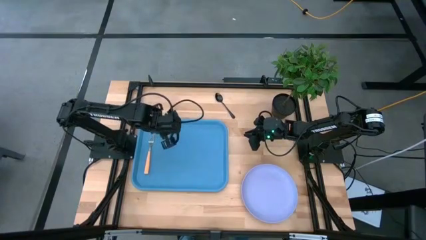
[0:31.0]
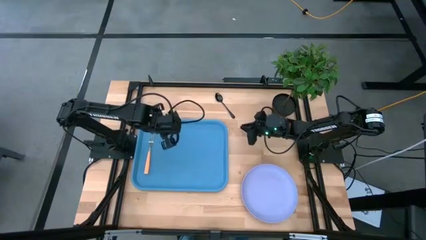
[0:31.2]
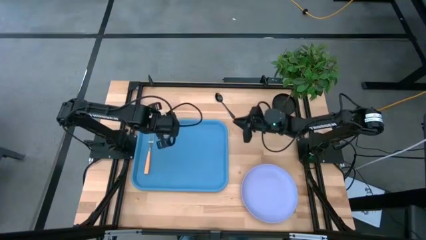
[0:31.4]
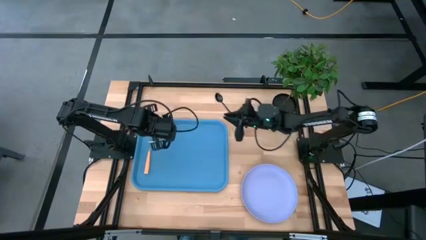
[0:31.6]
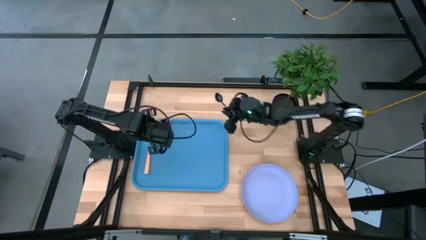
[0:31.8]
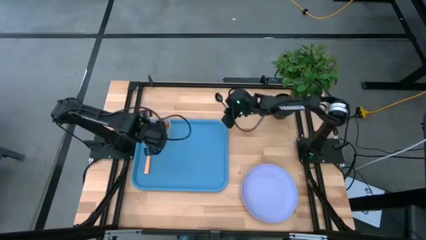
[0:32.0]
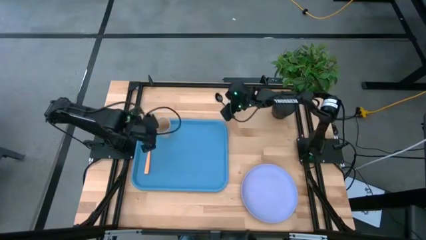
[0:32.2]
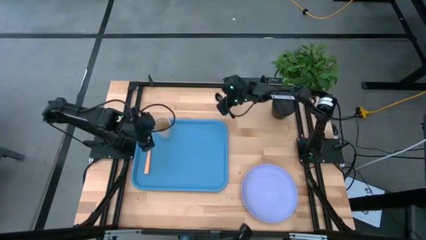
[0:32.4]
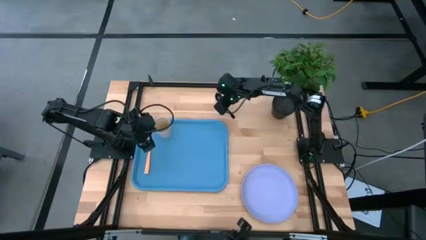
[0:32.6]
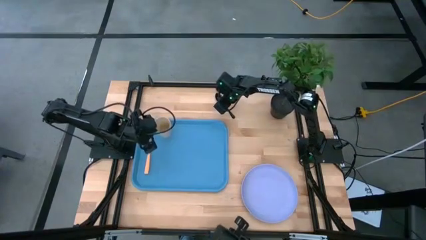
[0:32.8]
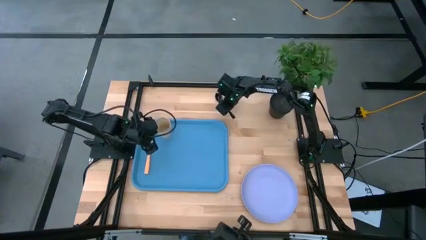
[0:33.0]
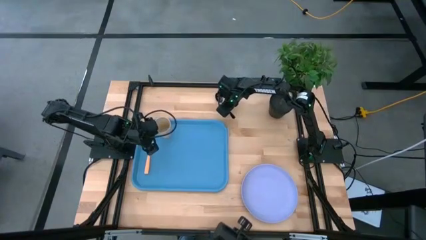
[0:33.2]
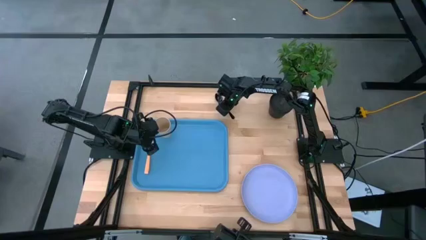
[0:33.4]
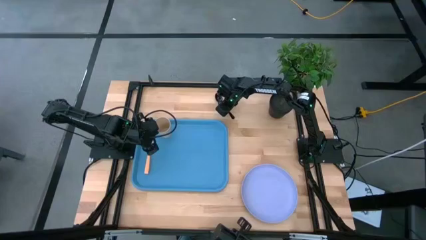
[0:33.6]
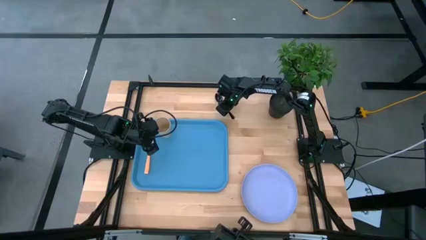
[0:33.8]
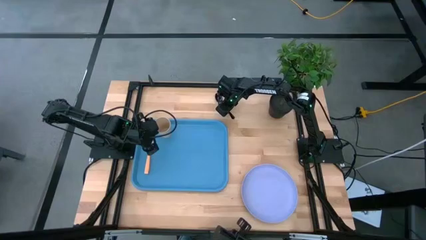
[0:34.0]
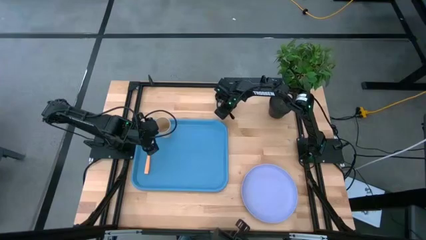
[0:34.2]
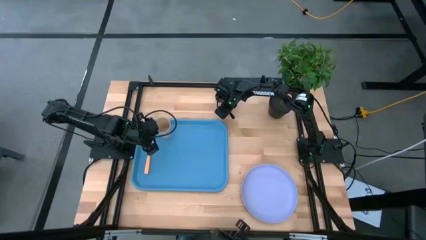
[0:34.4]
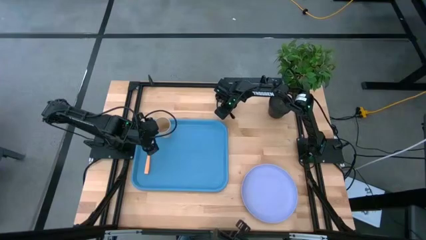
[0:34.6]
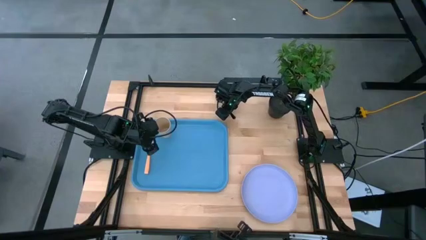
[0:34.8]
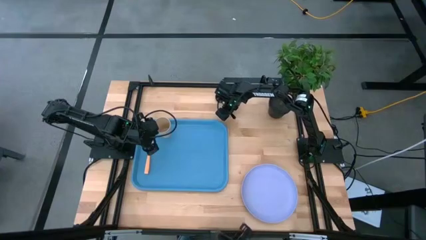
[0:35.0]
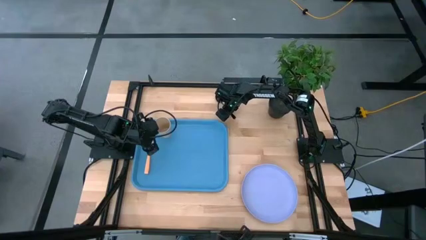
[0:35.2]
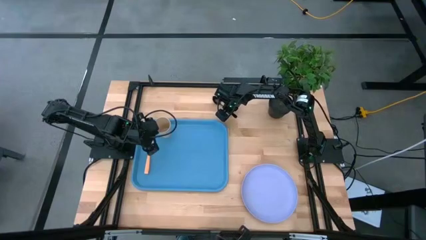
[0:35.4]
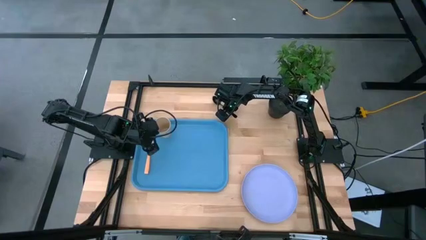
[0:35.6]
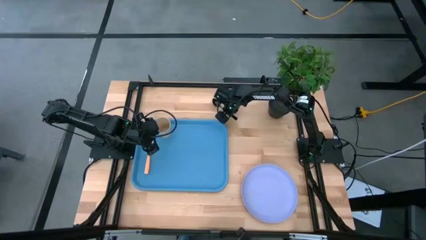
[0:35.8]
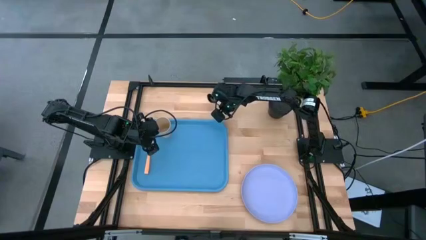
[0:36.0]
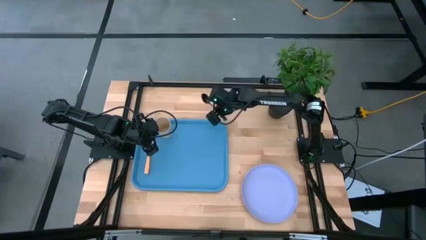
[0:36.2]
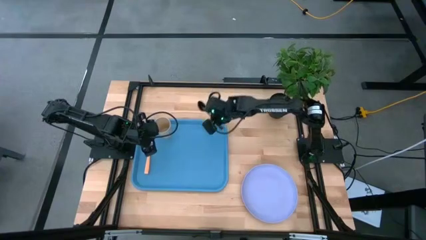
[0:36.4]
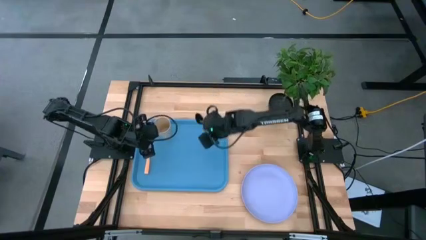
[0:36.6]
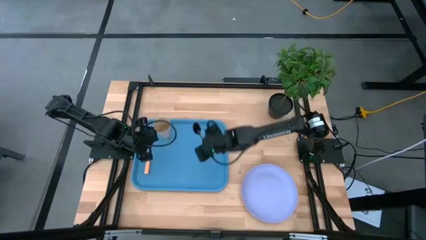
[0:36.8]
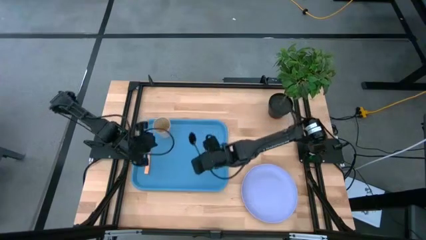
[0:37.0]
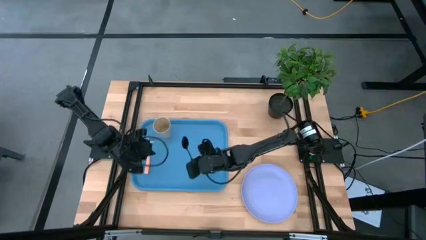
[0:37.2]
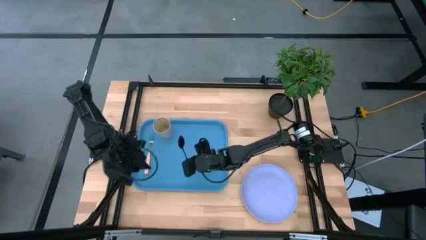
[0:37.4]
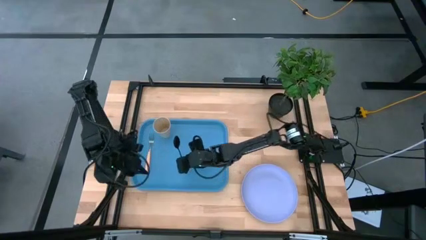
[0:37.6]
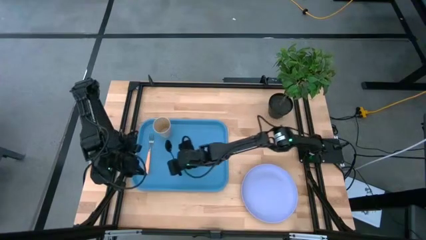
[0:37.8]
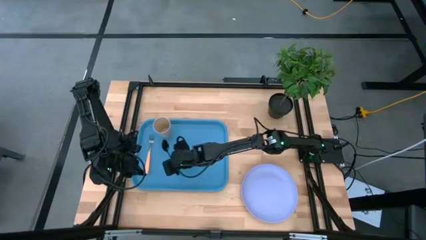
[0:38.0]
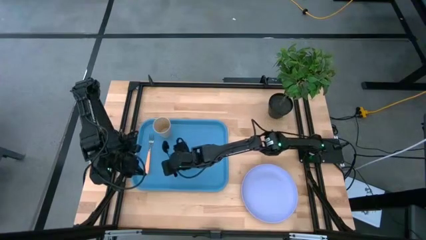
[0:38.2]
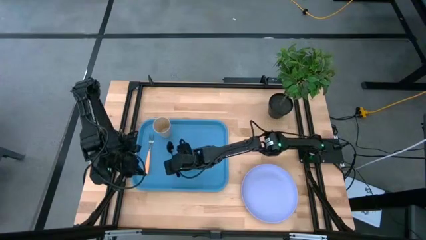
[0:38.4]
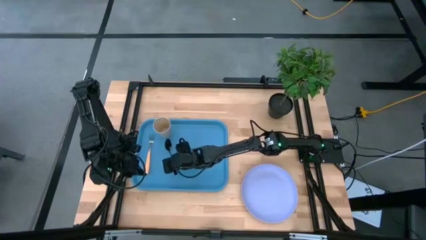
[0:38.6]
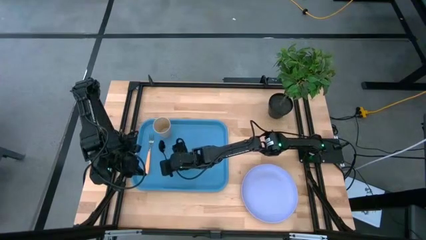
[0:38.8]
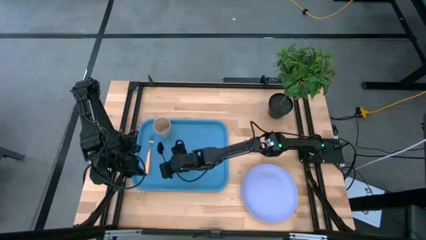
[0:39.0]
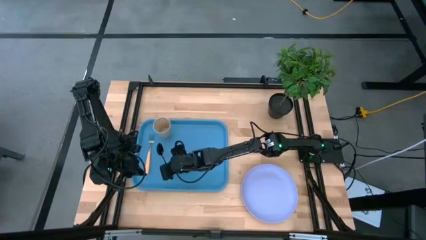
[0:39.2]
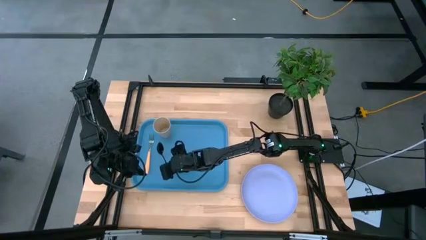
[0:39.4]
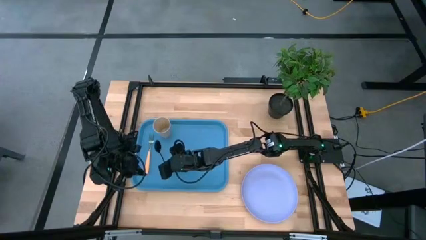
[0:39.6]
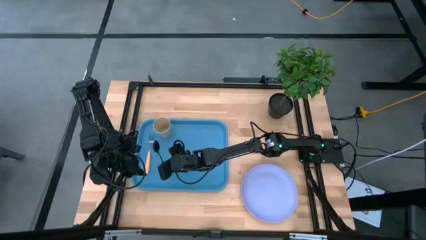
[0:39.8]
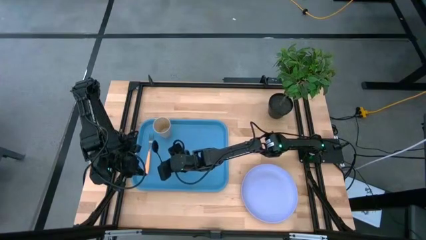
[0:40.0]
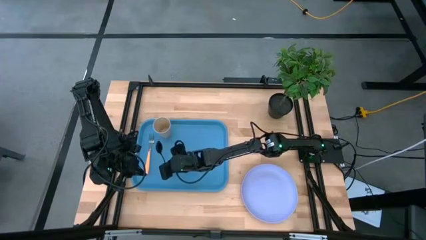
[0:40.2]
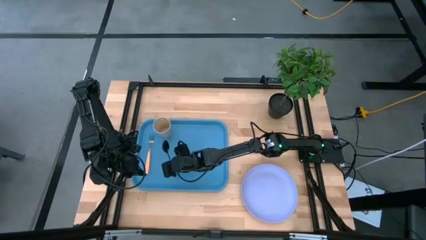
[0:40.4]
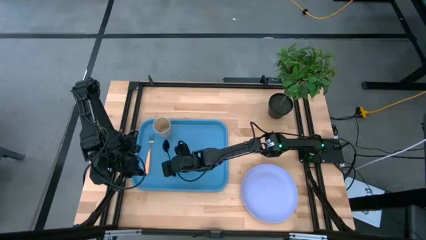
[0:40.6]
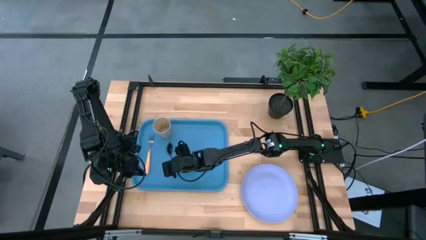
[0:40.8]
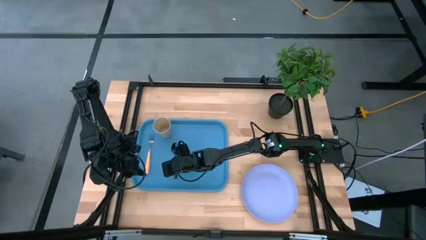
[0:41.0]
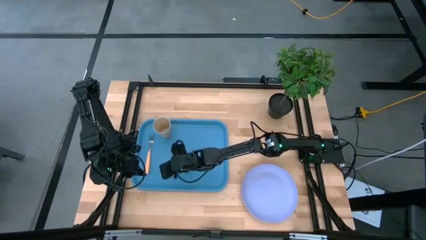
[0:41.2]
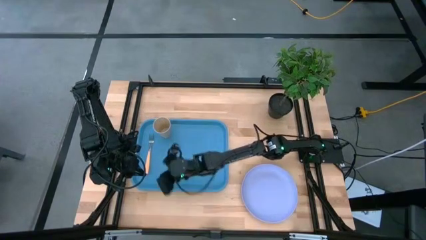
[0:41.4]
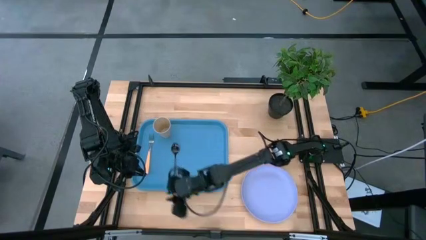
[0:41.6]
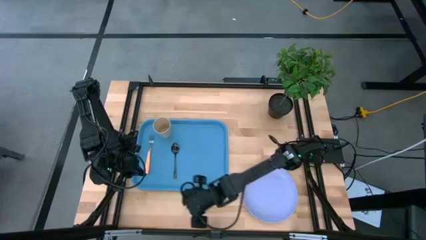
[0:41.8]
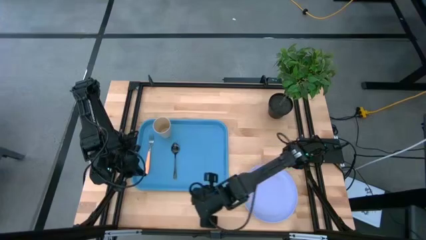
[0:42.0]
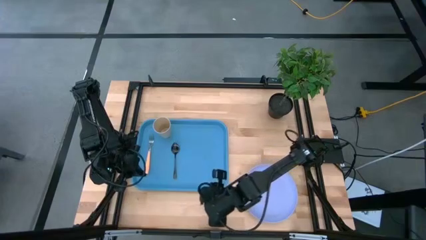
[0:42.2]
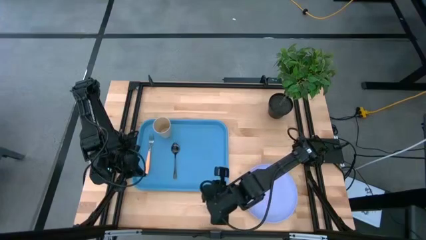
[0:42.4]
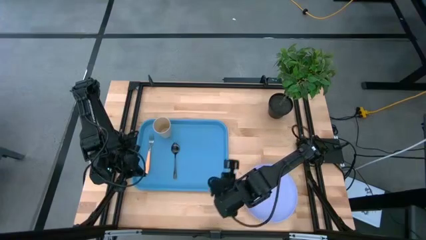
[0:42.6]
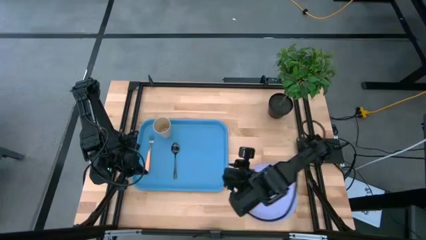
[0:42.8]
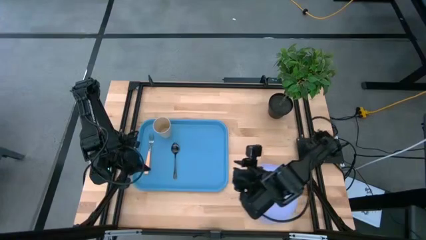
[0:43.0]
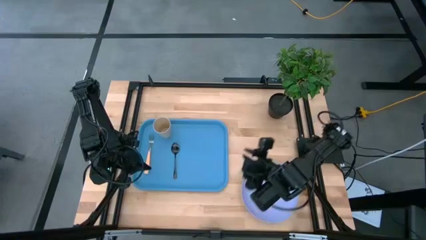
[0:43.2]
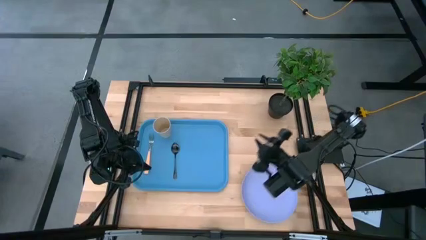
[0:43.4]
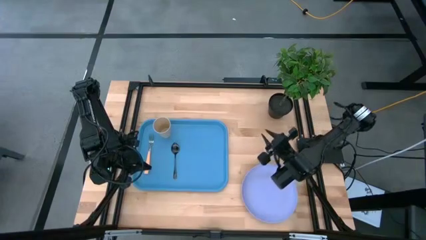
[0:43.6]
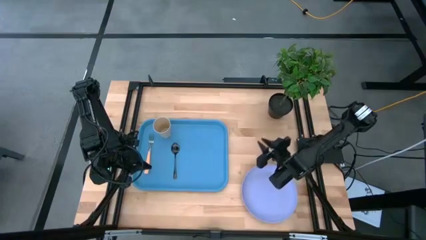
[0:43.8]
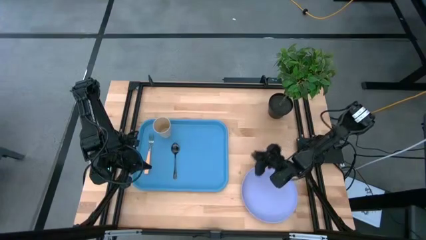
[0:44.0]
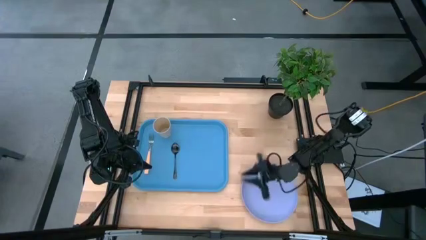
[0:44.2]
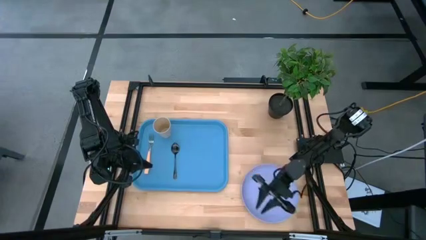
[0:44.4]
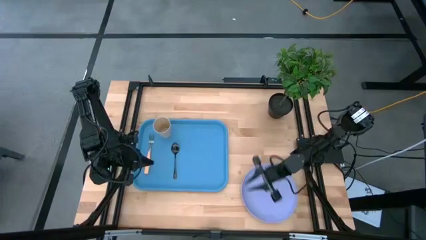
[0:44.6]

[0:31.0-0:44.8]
Task: Pick and place plate/cup/fork/spoon on tray
Put the black spoon on the blue tray

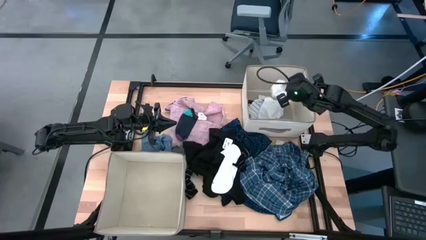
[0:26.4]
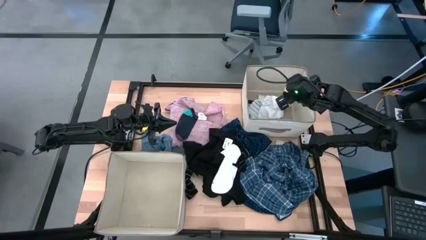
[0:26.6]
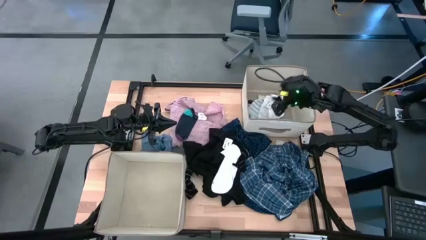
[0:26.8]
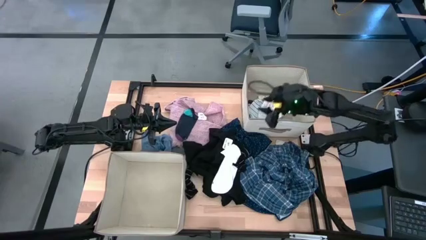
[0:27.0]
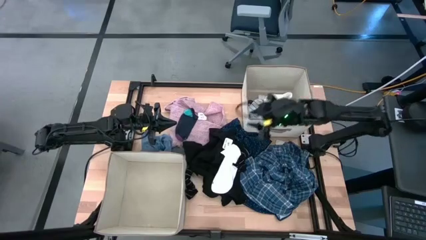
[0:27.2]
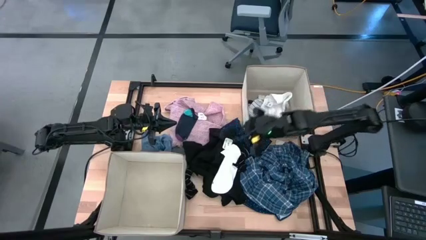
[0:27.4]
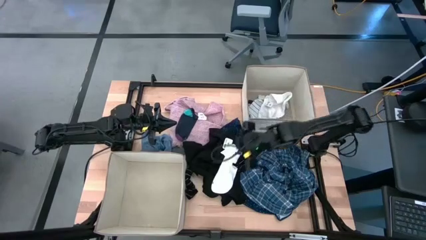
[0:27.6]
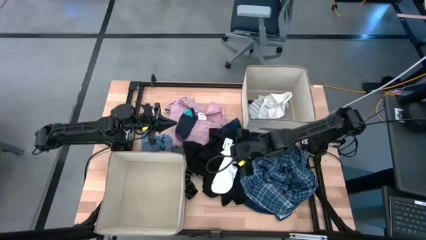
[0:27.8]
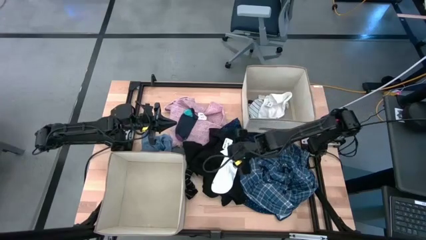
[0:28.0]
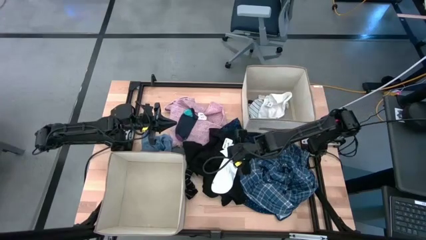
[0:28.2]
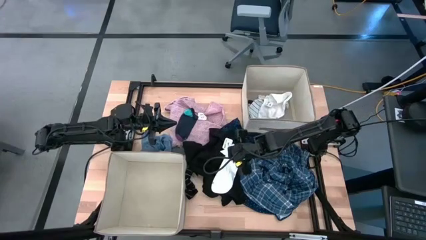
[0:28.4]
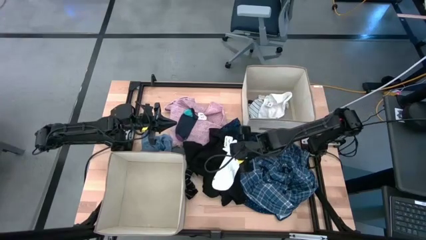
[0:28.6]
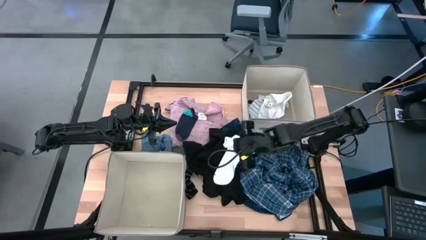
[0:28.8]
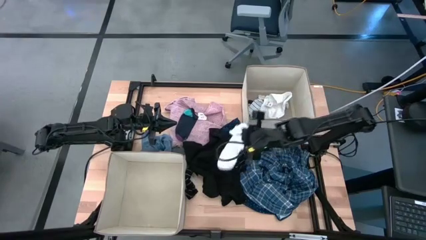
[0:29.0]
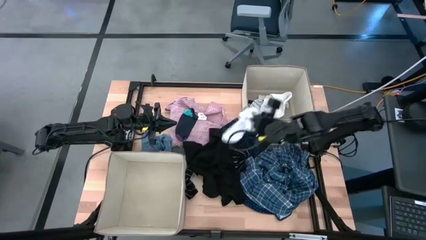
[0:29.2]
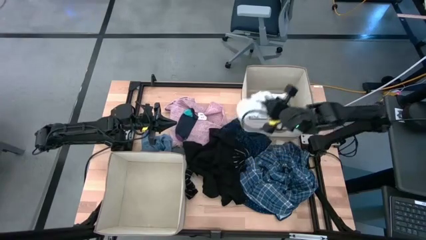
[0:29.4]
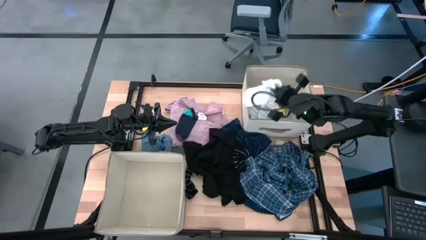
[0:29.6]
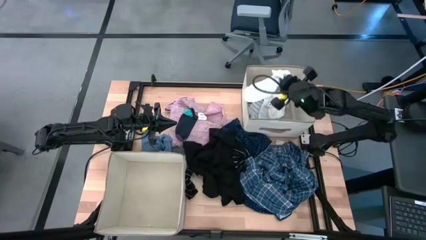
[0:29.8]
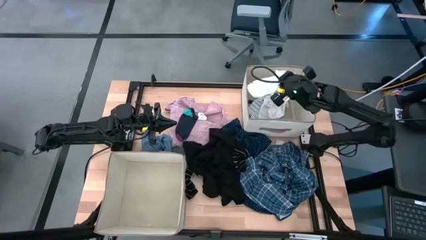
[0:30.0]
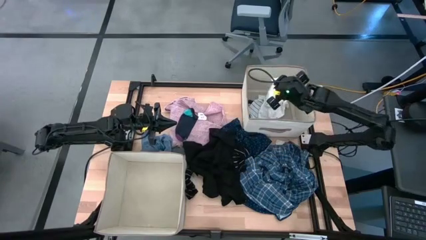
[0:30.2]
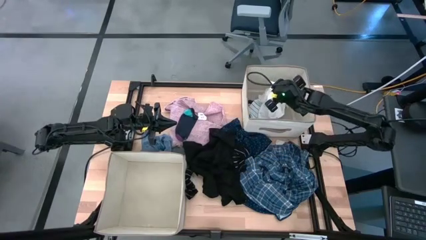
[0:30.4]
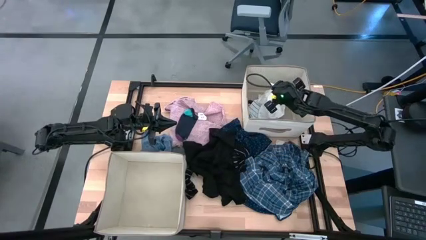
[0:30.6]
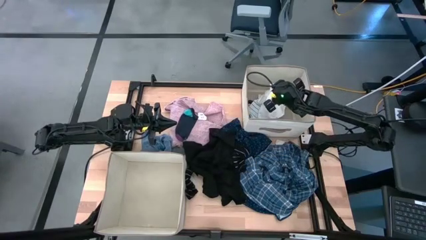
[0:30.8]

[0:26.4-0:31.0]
Task: Sort clothes
Put the white sock into the top white laundry organizer
